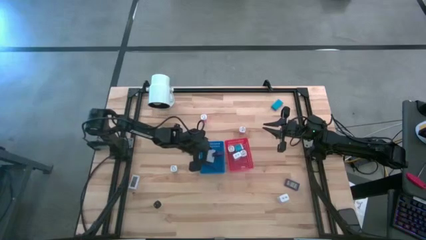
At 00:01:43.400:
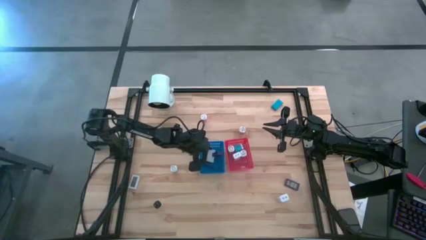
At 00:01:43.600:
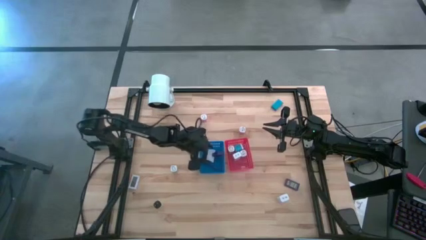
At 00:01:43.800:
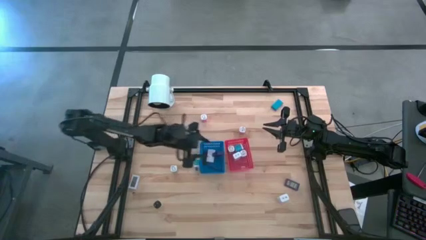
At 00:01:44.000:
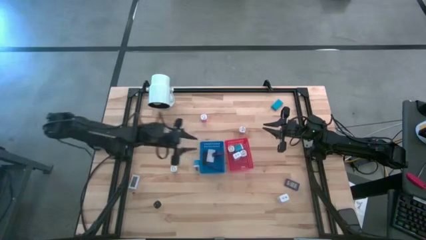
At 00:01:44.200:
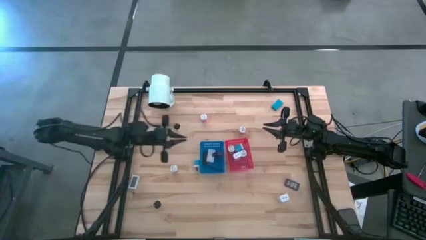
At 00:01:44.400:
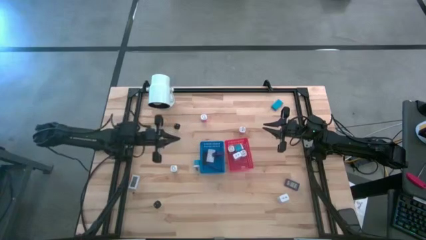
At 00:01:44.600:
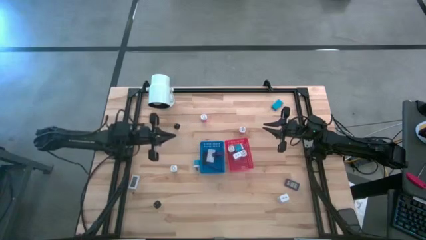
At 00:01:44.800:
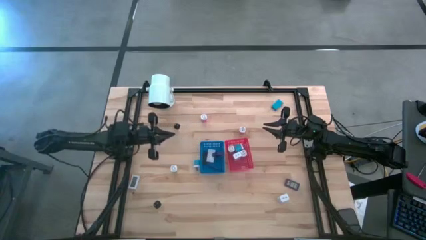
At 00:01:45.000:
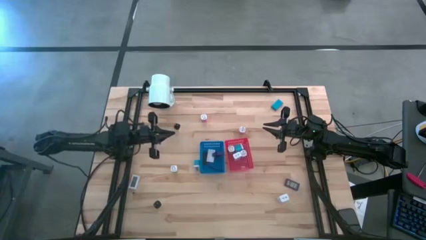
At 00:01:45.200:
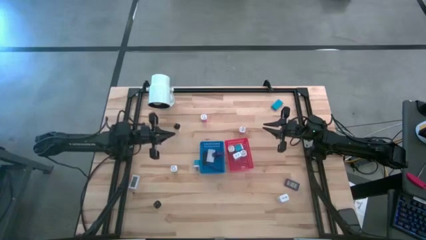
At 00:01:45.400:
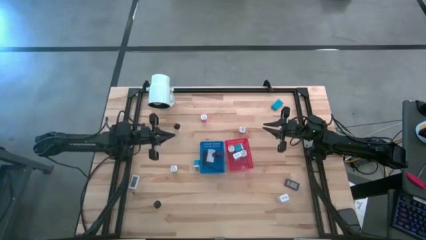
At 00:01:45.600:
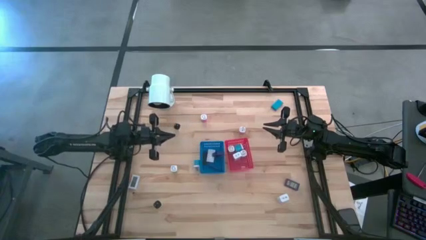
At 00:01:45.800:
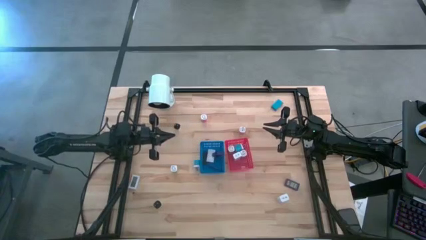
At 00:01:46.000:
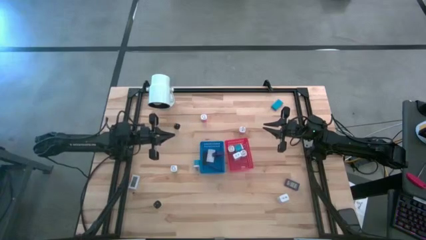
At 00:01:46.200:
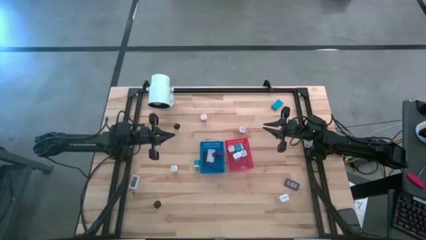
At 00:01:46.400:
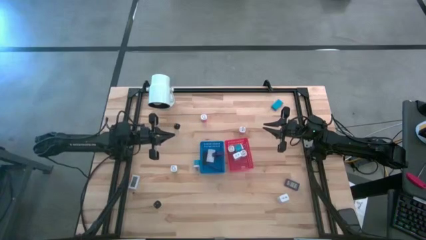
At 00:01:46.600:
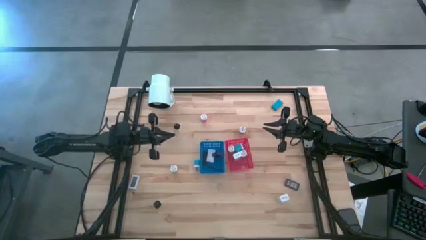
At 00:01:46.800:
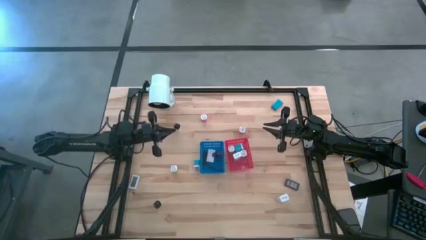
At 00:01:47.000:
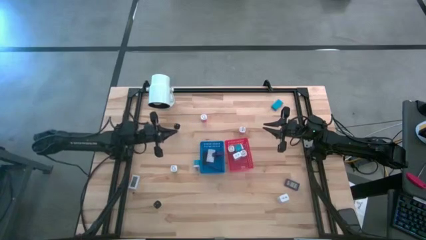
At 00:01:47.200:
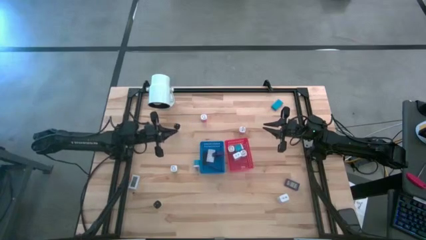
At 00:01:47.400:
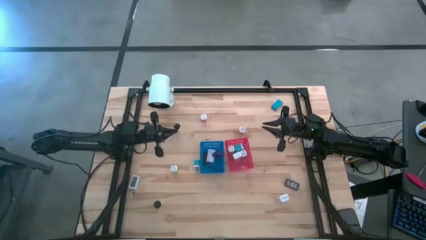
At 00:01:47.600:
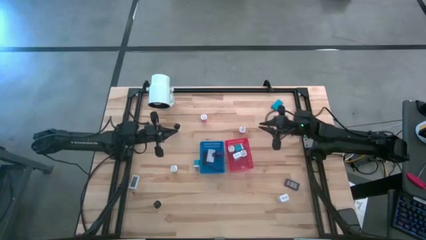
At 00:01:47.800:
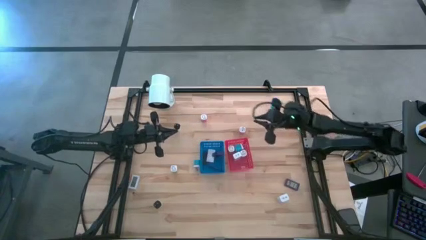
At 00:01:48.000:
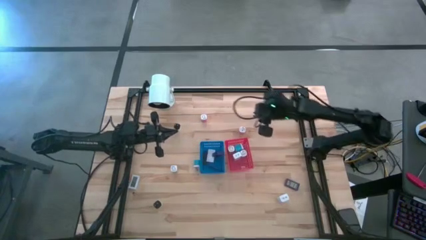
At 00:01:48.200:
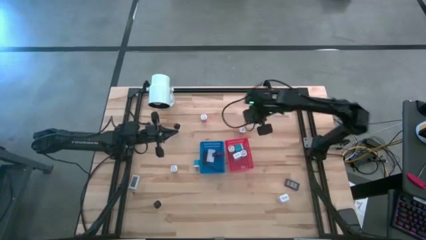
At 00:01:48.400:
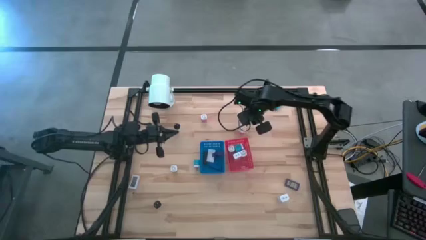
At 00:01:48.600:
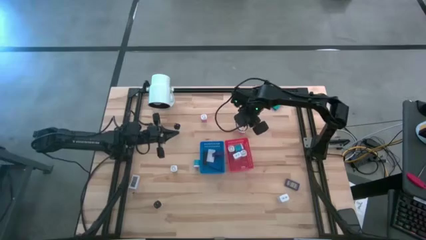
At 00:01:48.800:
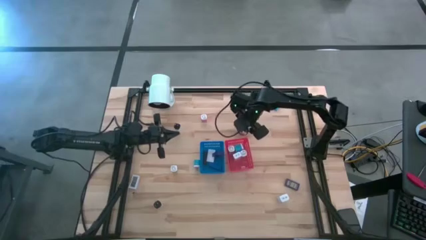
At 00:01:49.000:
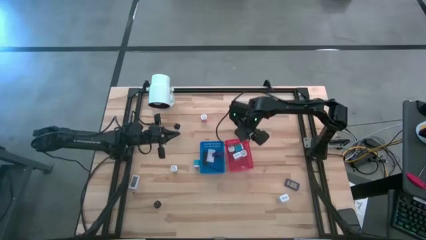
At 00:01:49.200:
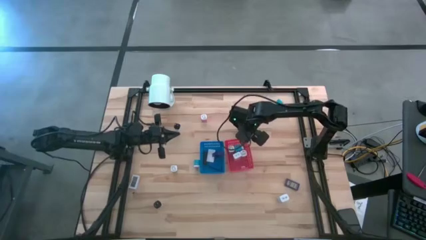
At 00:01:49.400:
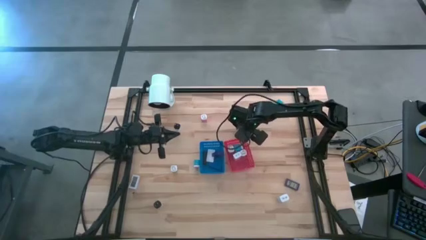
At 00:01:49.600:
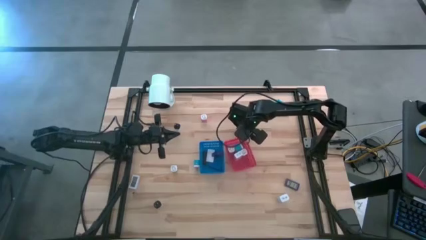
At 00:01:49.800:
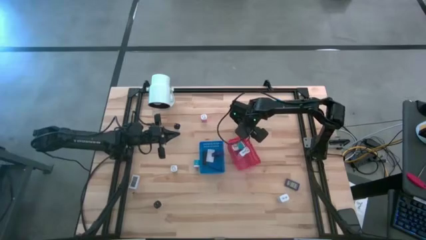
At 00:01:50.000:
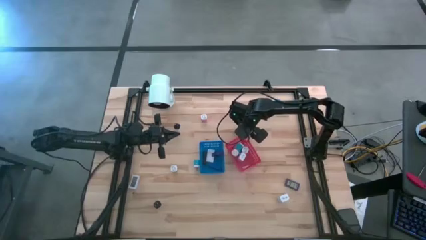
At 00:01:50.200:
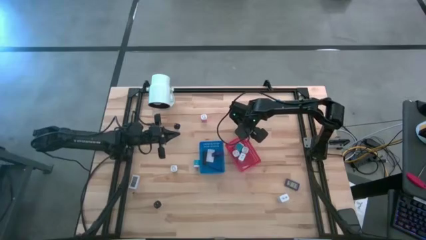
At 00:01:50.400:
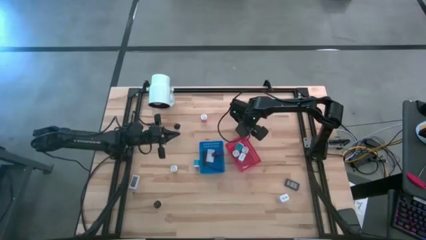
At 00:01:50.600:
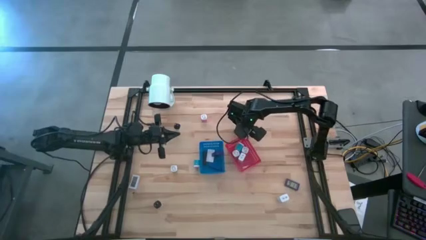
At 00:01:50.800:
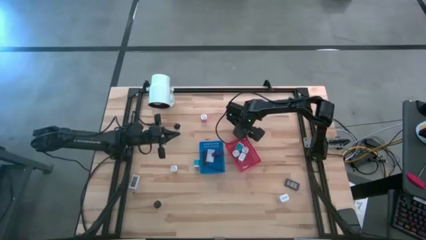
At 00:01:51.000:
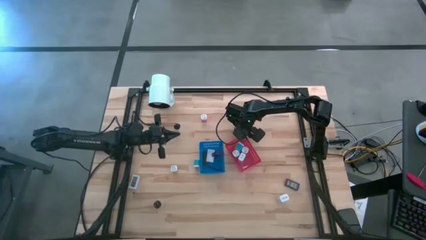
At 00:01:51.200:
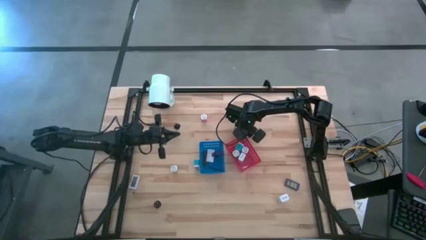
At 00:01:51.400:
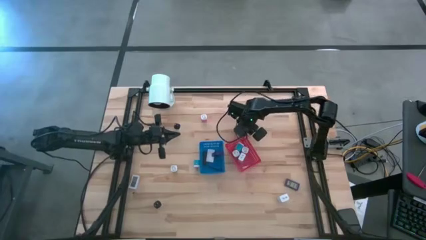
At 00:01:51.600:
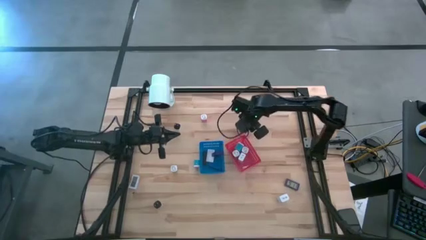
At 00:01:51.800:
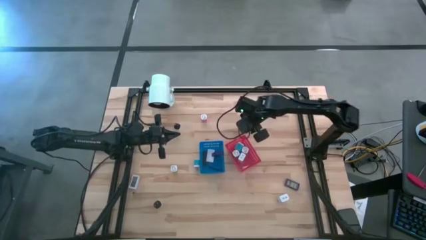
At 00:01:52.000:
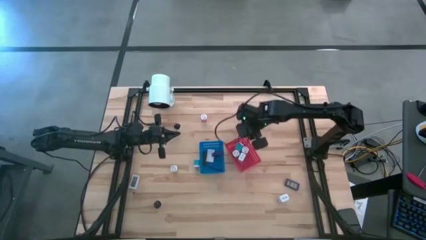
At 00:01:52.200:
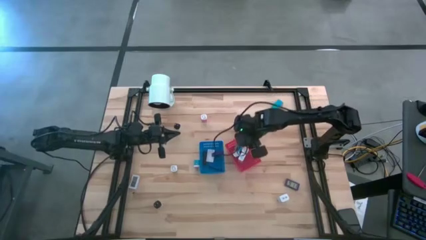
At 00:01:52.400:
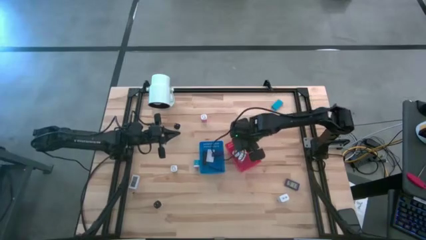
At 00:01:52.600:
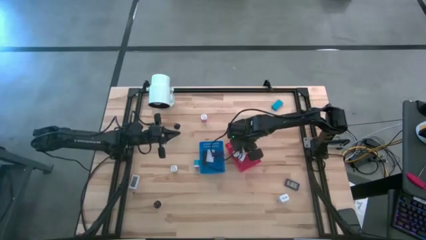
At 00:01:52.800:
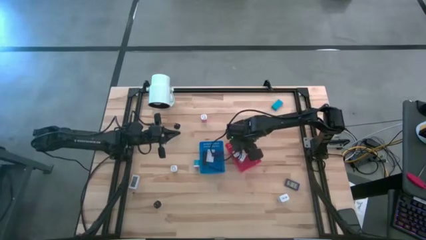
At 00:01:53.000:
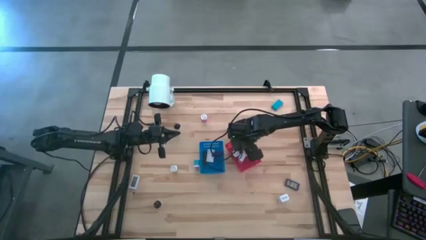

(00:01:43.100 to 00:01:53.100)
Task: Sort adapters and digital timers
Put the right pink charger adaptor into the red bin

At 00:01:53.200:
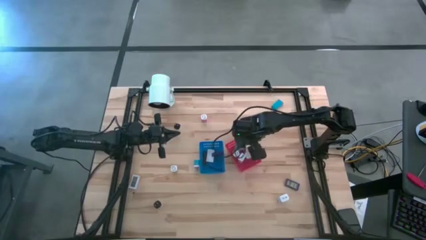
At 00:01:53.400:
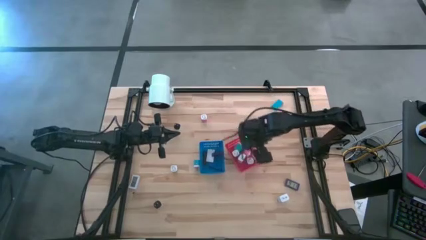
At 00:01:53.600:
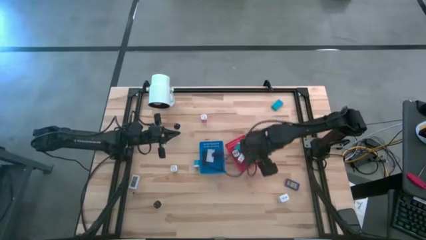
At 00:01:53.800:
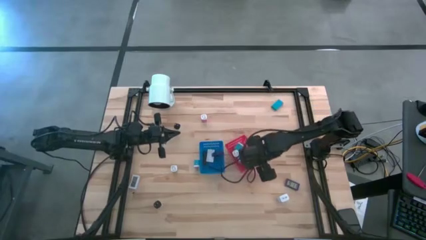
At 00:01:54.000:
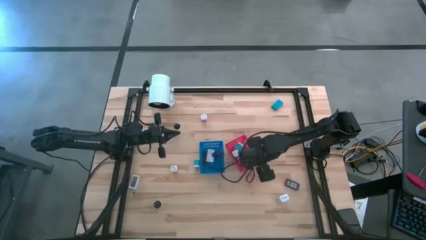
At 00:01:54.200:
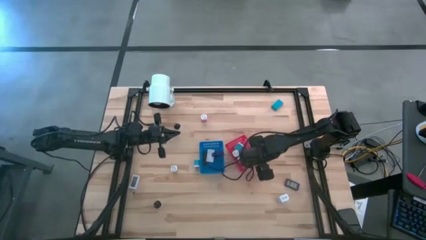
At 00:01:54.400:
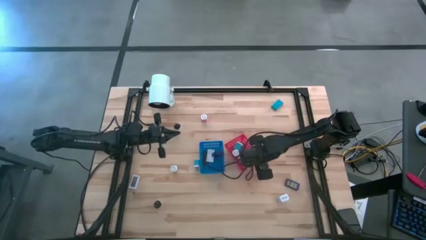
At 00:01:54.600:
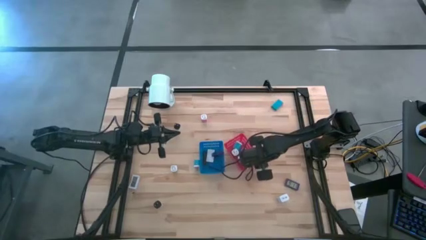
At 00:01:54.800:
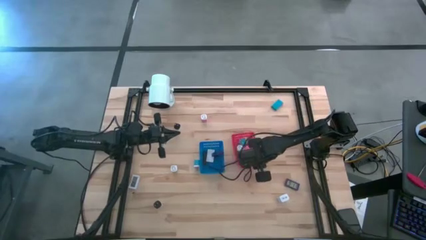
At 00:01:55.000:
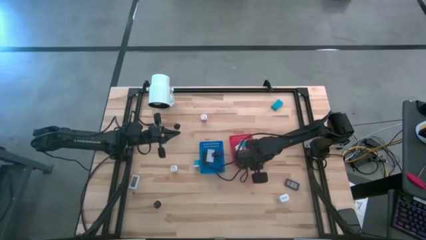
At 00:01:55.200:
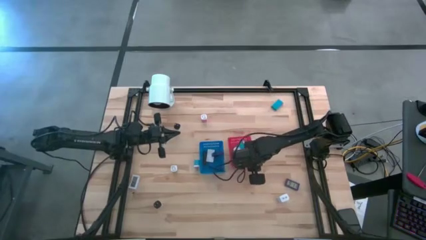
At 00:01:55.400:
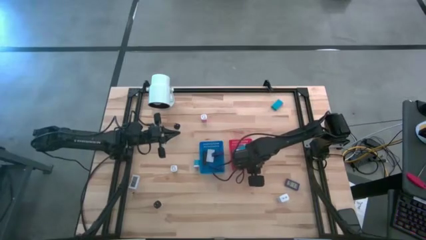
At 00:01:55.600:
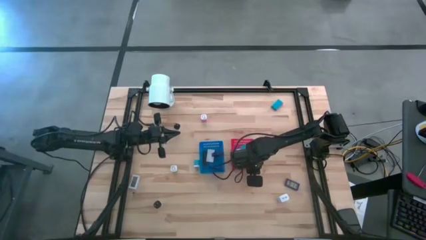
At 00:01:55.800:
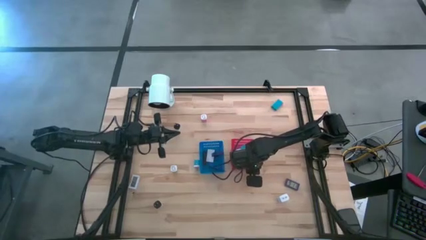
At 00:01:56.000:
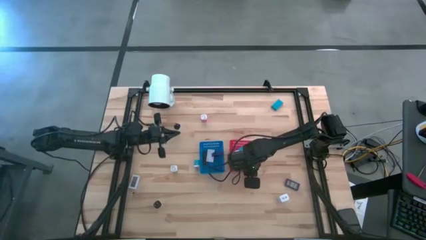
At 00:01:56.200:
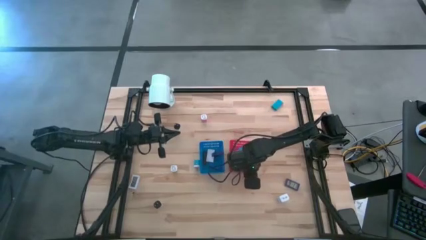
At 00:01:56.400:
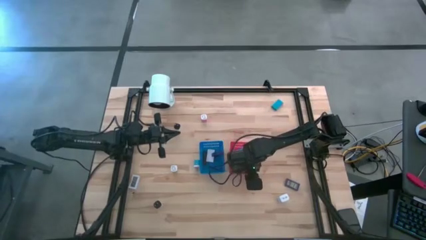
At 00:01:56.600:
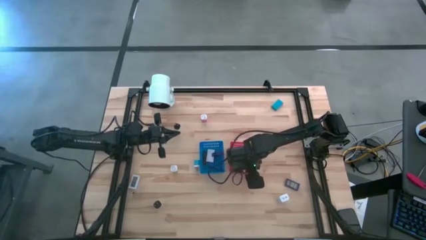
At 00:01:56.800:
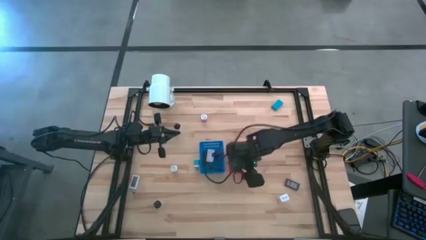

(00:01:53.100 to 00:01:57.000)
Adjust the red bin

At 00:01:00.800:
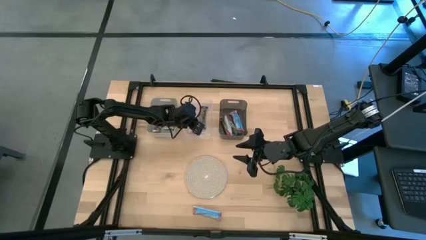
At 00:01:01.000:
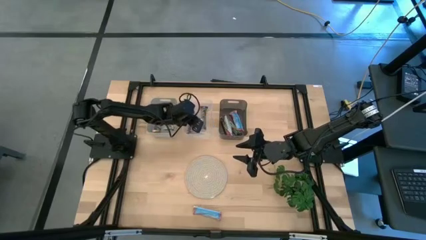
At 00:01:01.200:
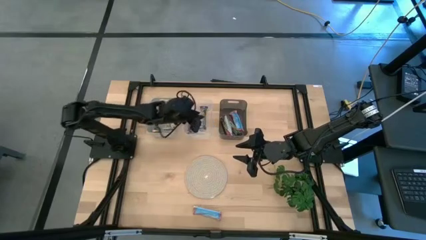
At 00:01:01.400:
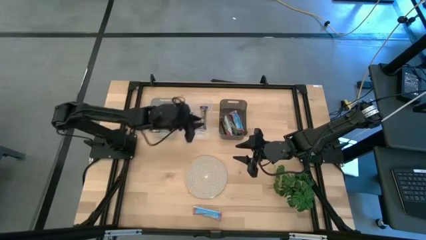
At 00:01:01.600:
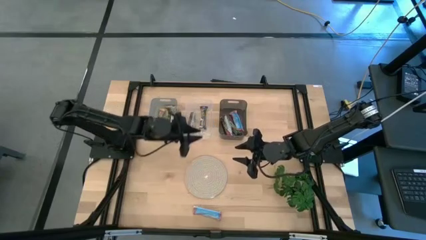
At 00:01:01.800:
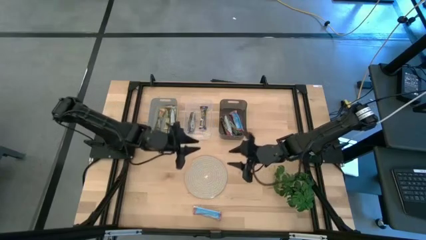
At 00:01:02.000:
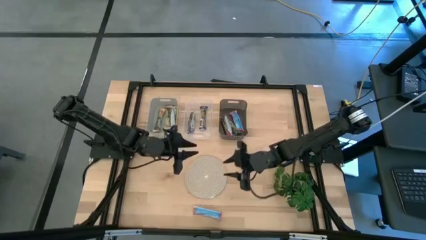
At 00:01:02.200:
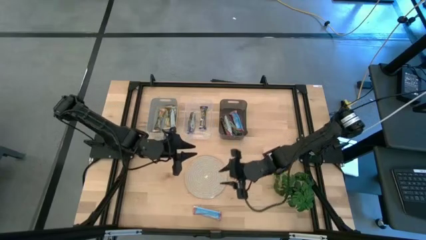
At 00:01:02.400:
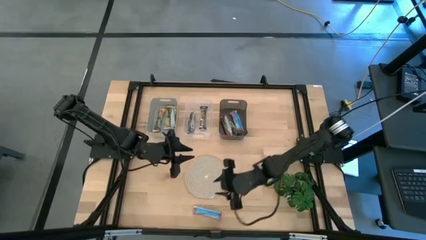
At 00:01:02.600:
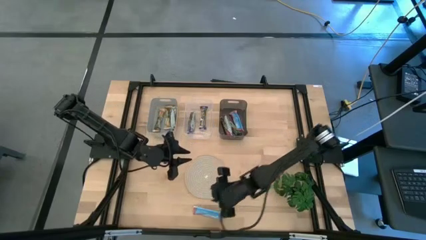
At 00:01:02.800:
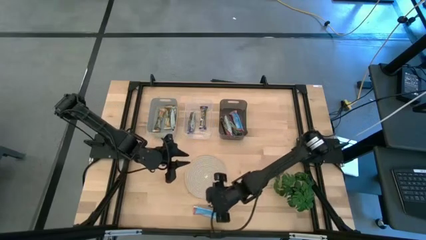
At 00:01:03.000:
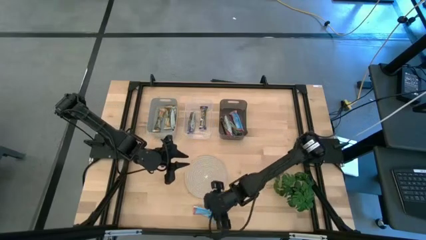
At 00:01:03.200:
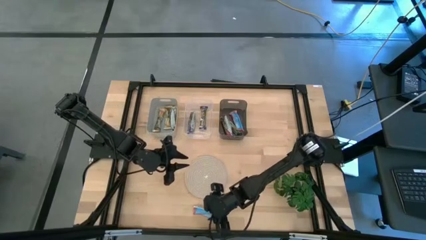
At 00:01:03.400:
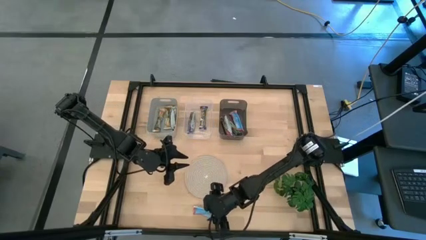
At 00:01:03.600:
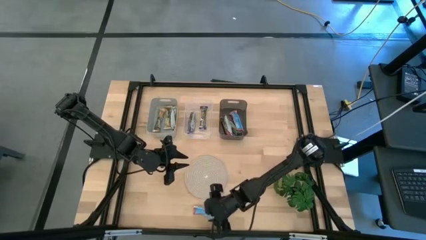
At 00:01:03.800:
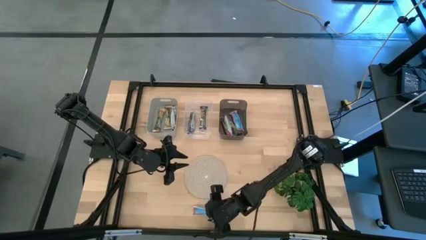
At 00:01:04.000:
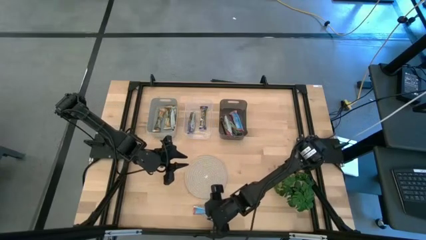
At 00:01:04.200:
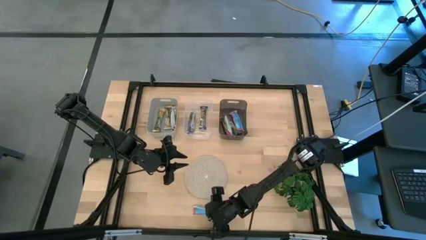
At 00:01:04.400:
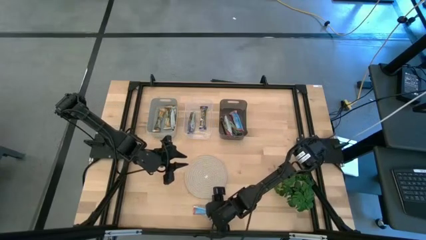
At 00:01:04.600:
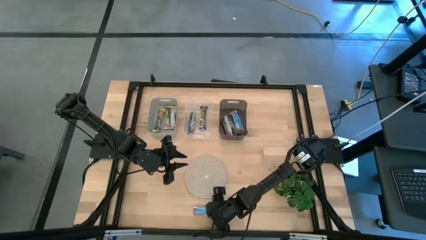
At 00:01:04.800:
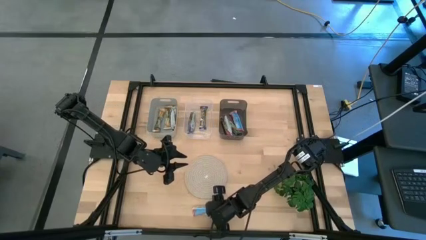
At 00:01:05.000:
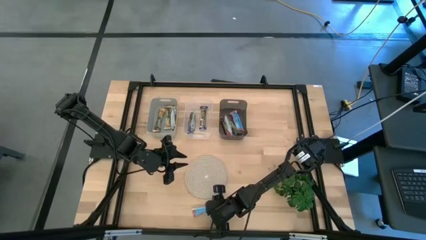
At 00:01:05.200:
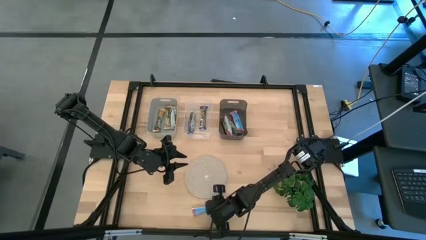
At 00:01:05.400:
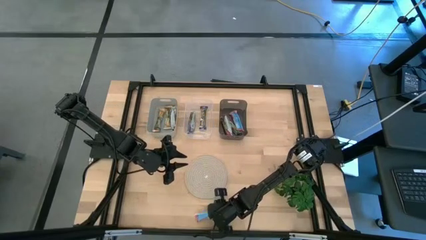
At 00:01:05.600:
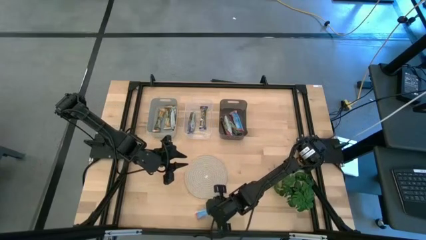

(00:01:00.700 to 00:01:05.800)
Task: Pick and place Granola Bars by type
Put the red granola bar into the black bin
